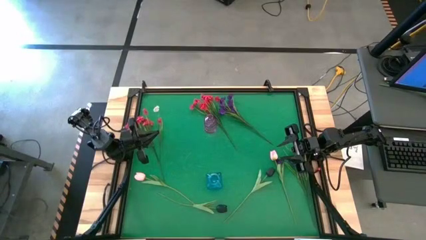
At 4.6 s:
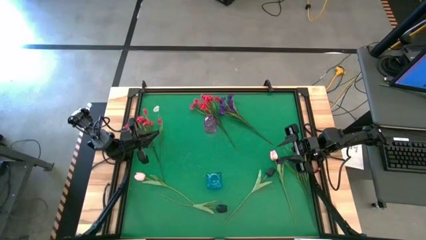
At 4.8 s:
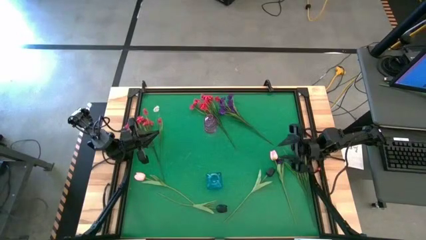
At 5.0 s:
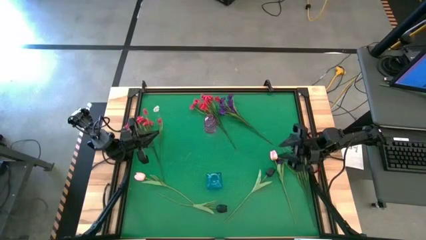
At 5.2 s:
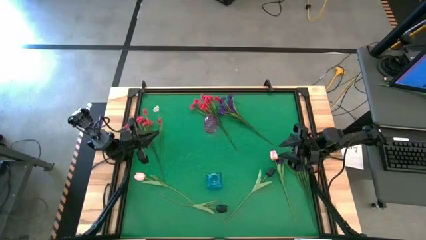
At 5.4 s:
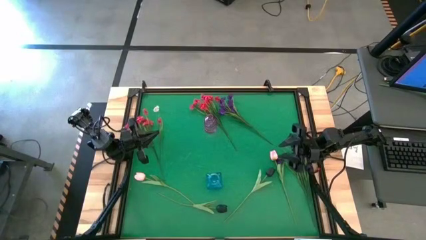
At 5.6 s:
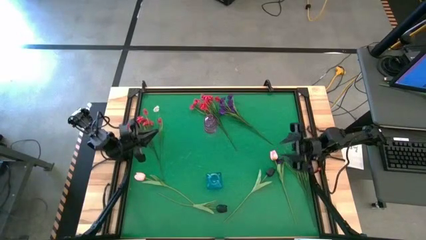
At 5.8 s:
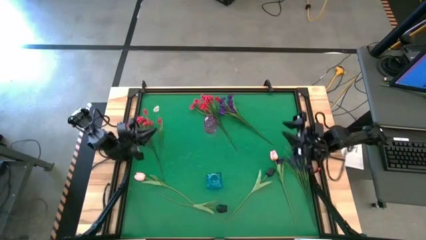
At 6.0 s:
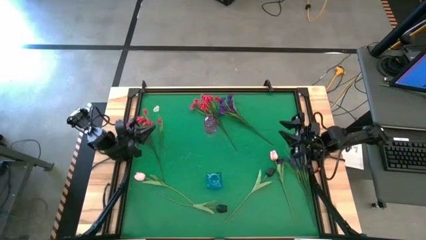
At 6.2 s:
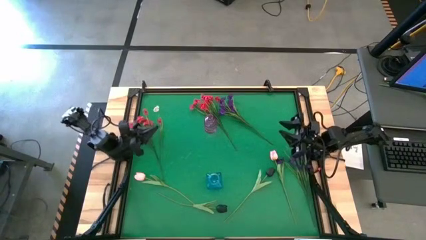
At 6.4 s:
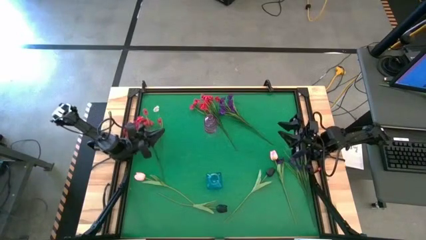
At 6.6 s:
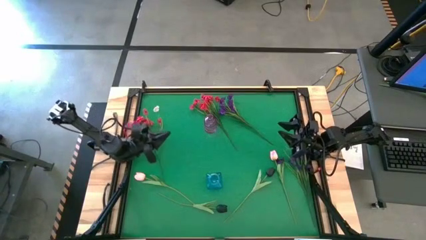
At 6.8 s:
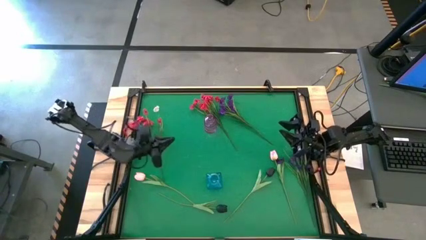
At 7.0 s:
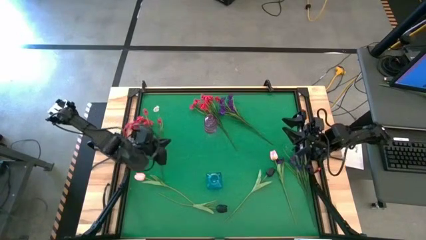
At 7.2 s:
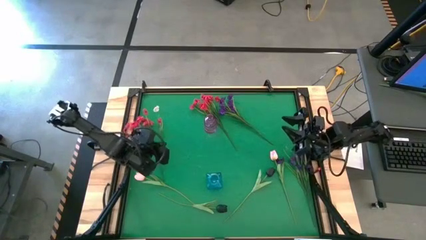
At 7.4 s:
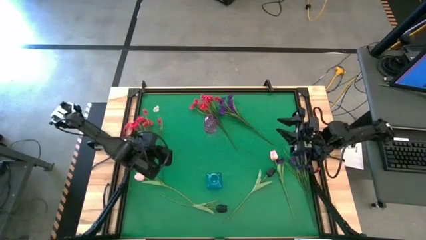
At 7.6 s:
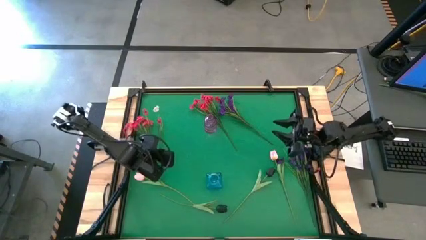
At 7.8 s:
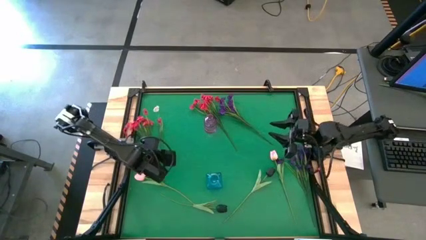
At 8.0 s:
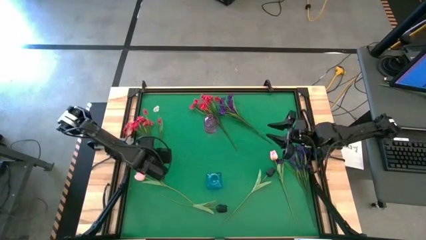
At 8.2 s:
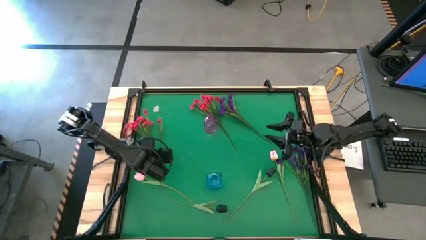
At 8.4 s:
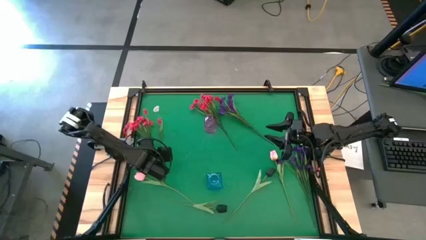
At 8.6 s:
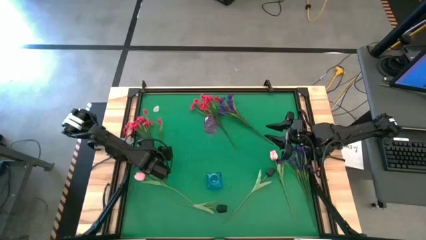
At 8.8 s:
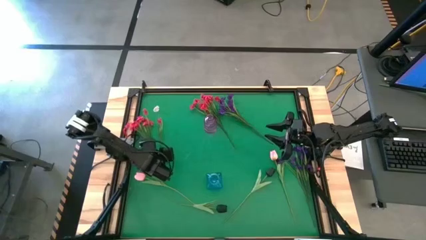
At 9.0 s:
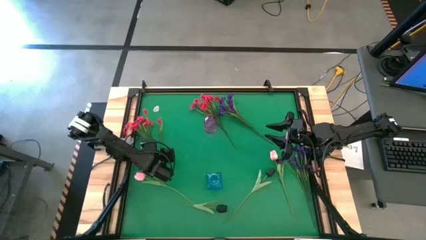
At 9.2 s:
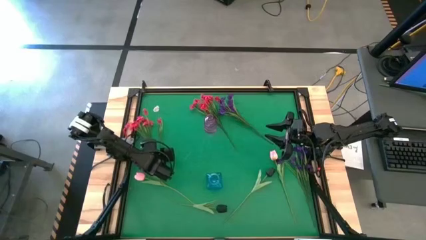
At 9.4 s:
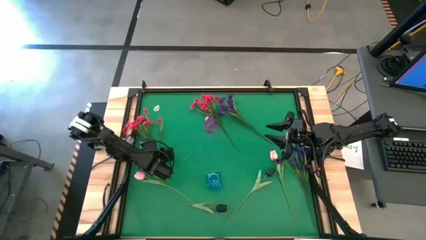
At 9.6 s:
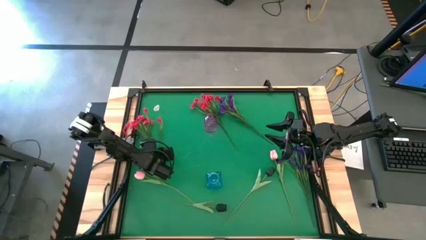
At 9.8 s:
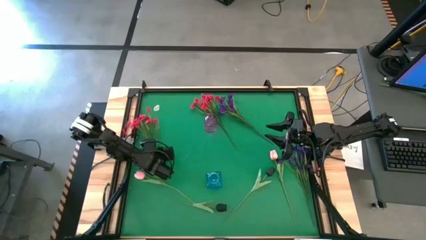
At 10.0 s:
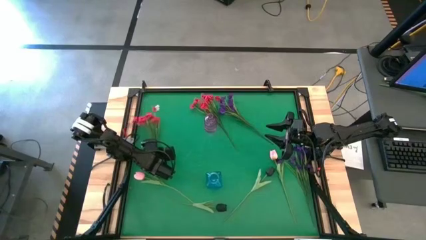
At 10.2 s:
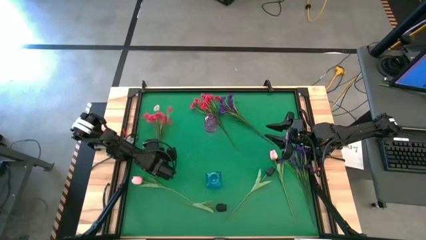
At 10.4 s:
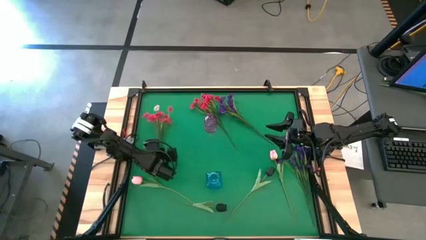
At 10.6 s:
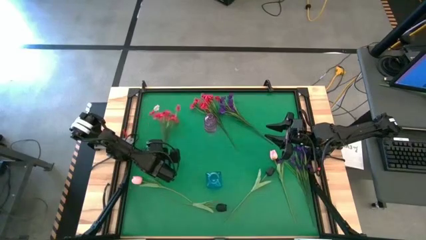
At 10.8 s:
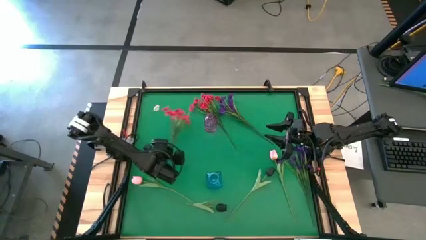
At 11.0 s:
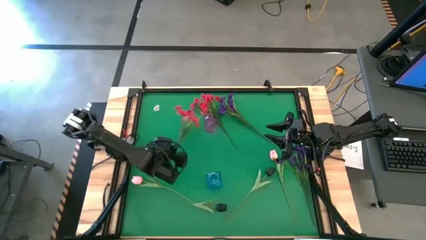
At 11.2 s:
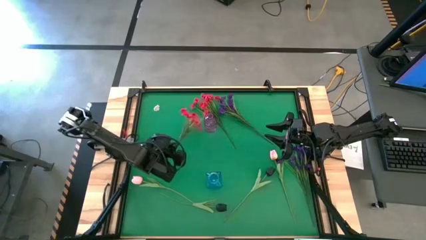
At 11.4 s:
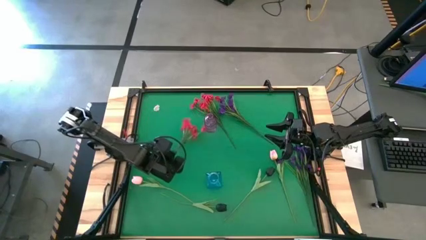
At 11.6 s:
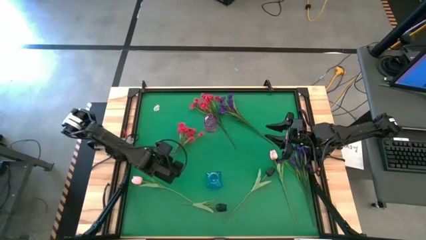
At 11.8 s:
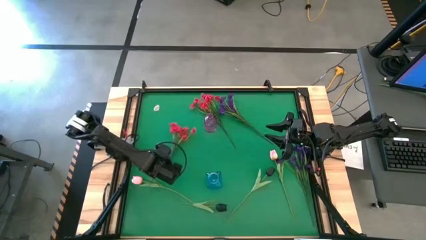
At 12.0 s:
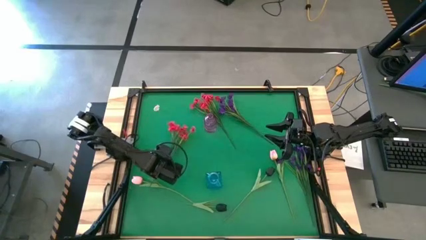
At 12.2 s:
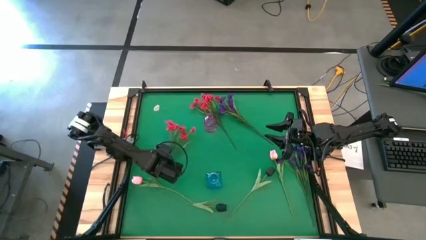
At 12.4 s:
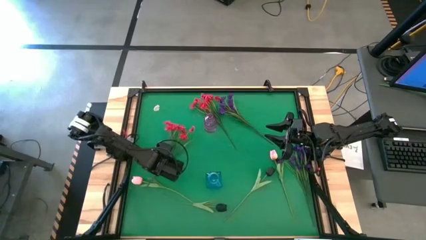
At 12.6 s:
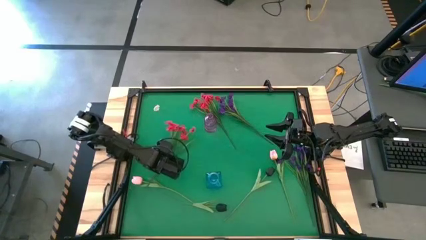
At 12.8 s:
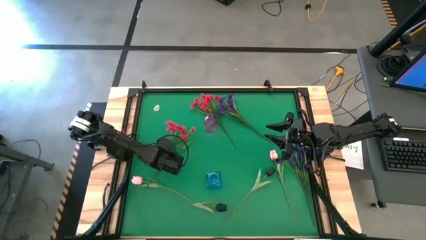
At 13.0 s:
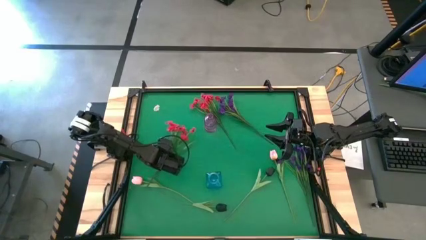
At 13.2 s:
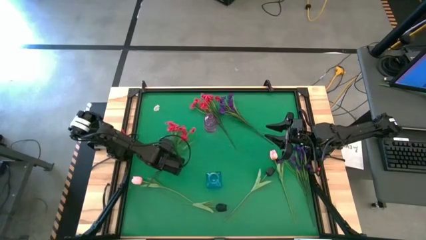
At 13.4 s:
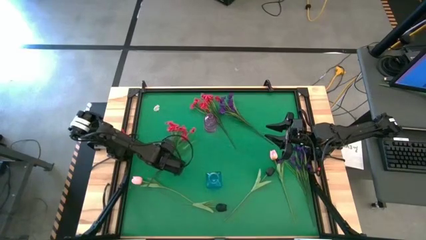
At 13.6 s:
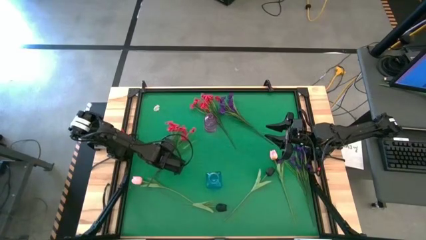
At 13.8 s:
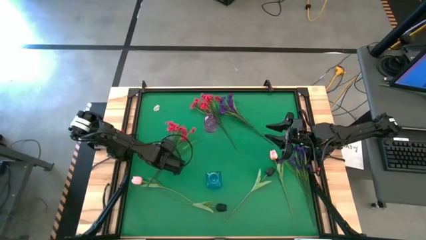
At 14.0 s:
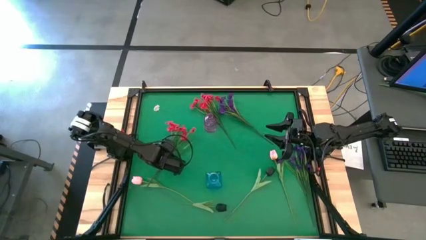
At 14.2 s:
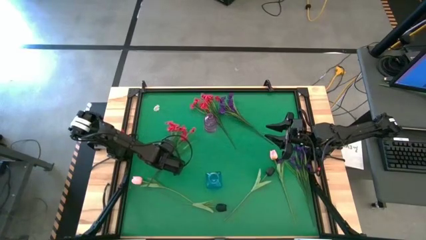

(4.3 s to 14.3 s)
Task: Sort flowers into vase by color
Put the left red flowers into the purple vase

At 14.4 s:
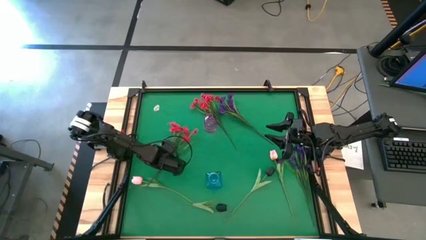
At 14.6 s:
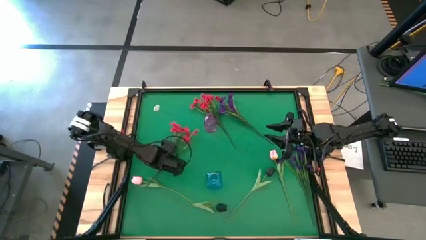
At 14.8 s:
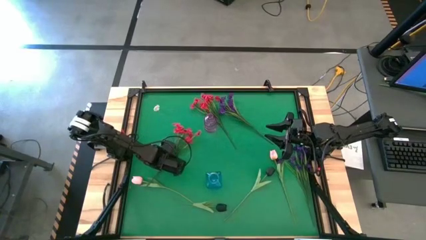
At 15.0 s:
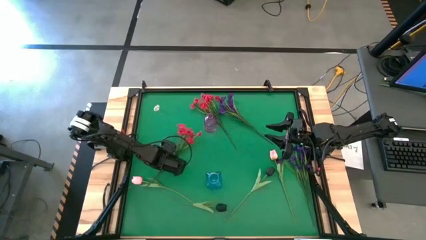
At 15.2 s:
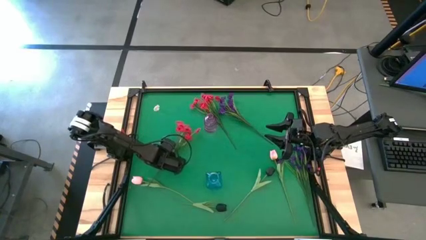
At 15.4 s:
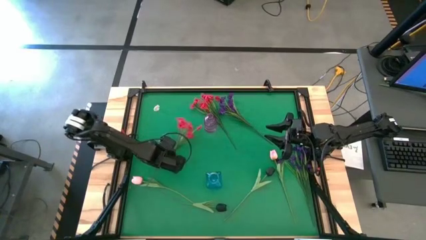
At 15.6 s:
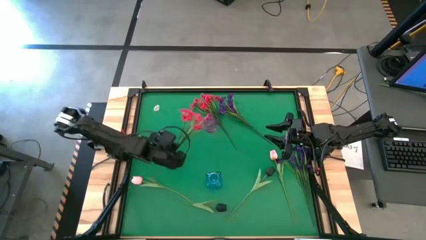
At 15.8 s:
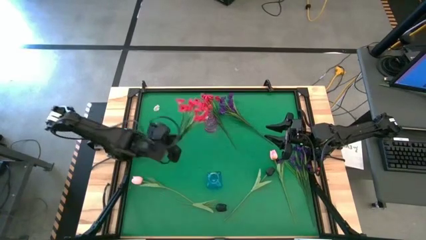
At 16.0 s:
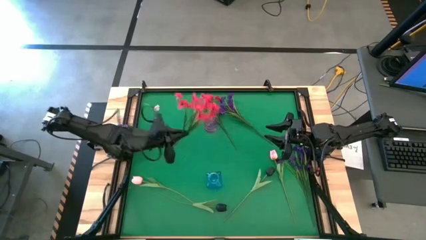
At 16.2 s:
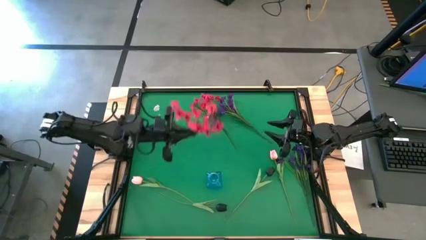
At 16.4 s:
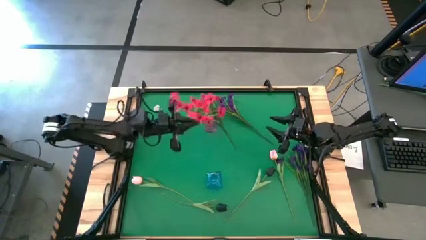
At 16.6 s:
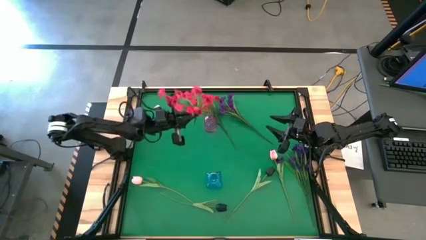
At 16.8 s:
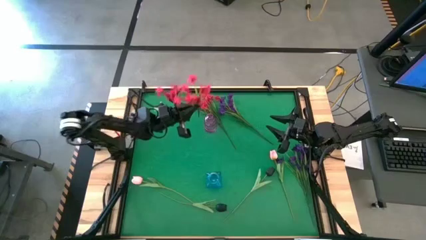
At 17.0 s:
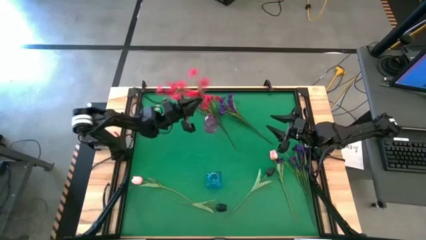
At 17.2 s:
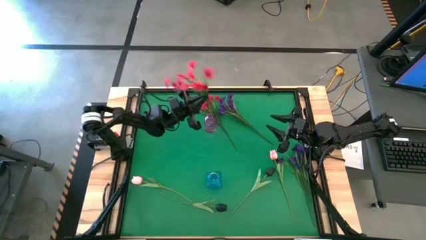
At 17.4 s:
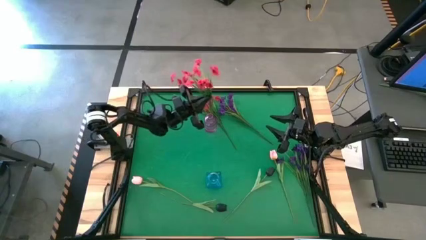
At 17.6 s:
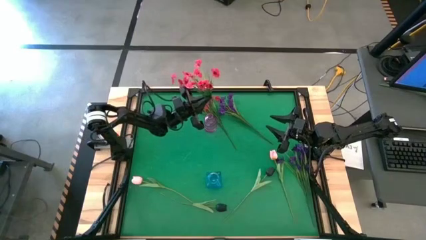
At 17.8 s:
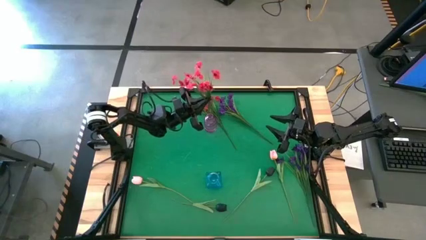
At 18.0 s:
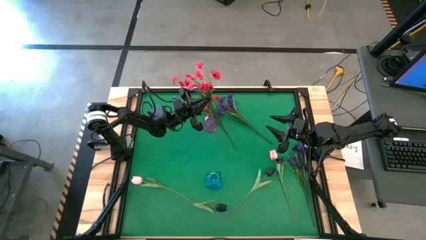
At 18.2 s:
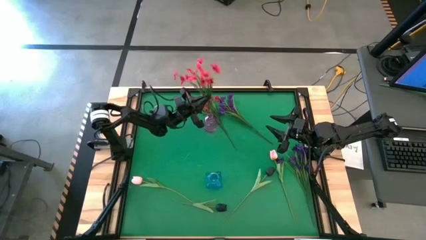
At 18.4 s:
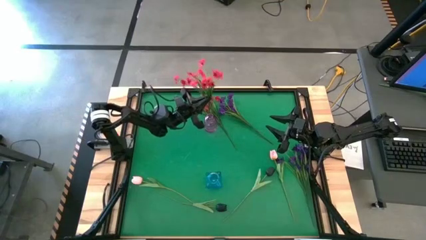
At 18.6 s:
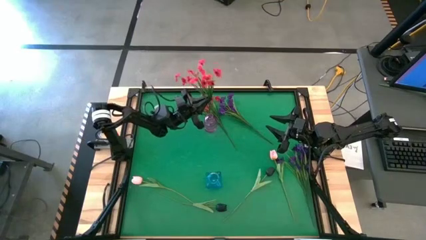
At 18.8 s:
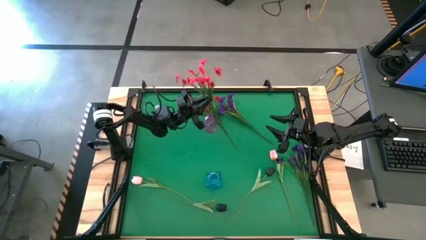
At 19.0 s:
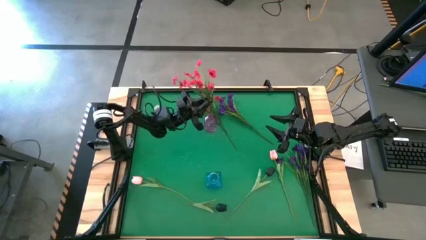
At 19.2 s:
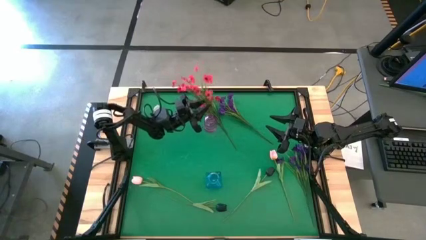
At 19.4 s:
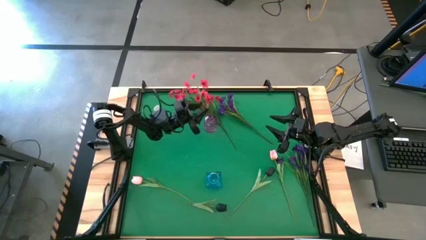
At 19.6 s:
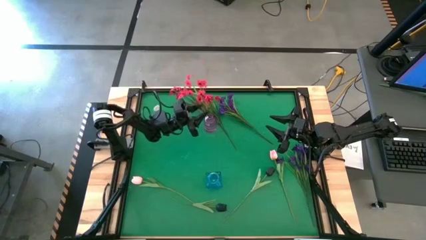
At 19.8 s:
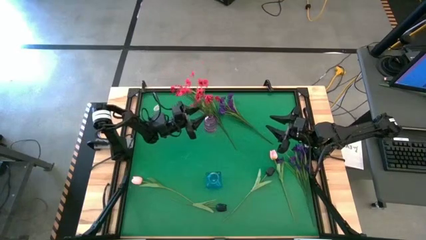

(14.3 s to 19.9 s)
Put the left red flowers into the purple vase
